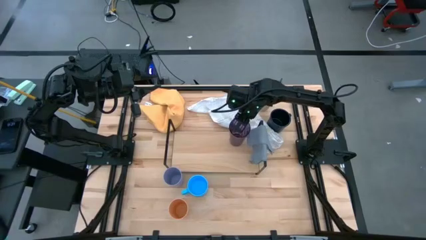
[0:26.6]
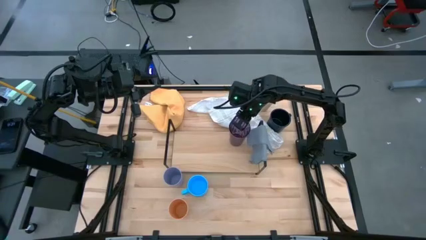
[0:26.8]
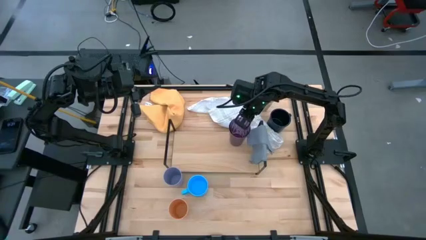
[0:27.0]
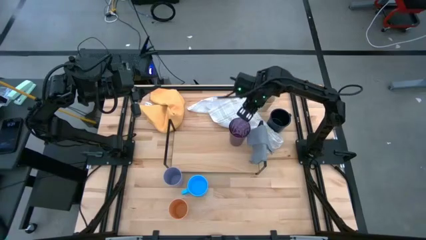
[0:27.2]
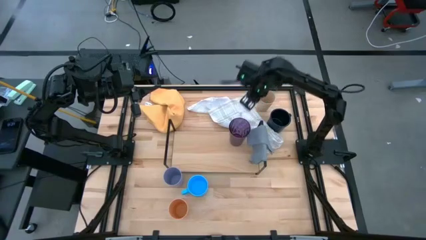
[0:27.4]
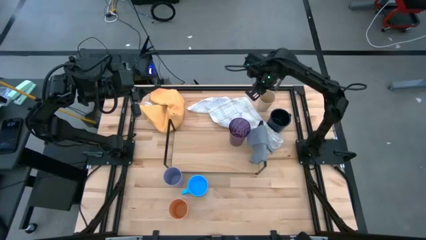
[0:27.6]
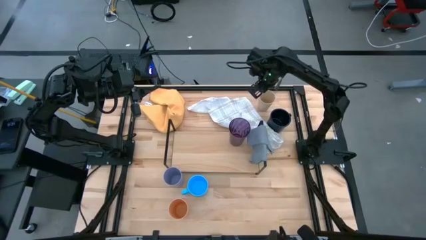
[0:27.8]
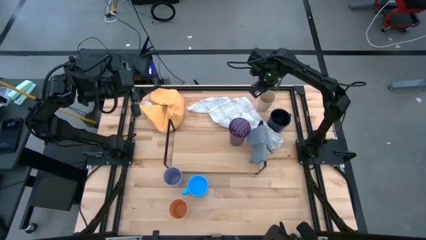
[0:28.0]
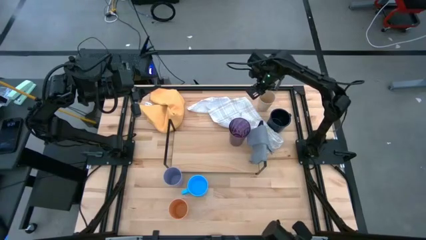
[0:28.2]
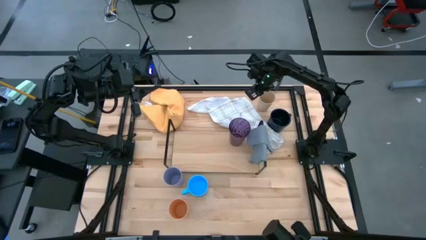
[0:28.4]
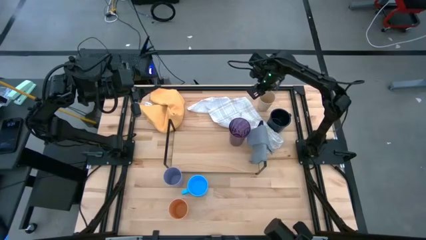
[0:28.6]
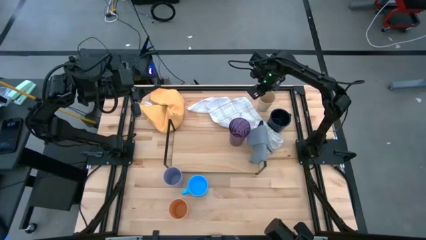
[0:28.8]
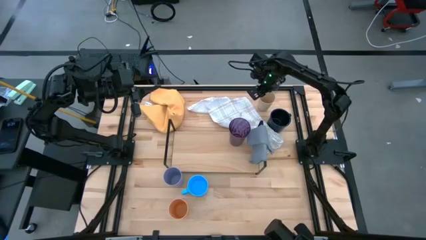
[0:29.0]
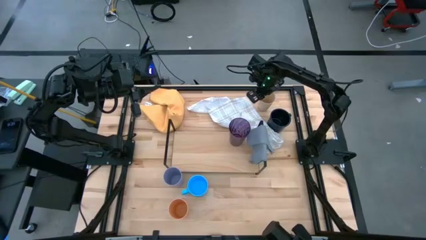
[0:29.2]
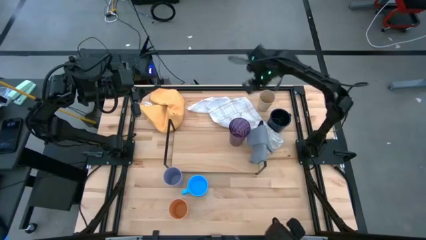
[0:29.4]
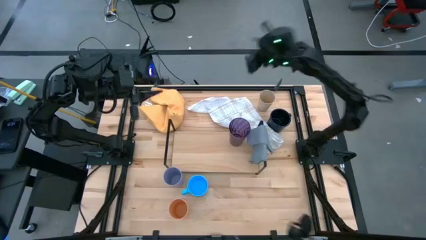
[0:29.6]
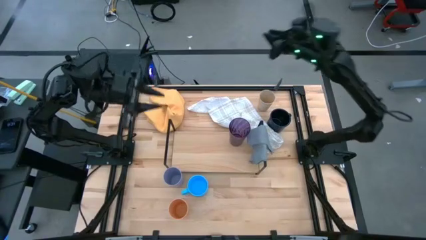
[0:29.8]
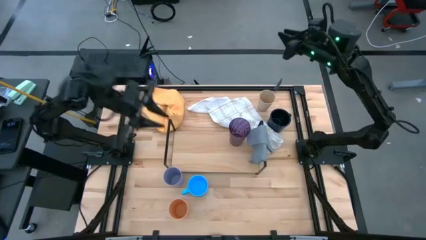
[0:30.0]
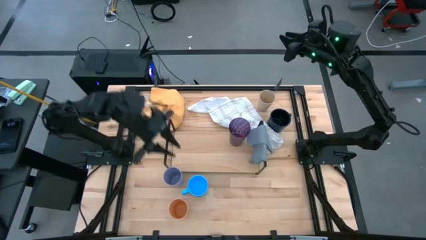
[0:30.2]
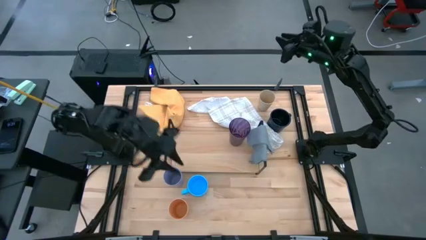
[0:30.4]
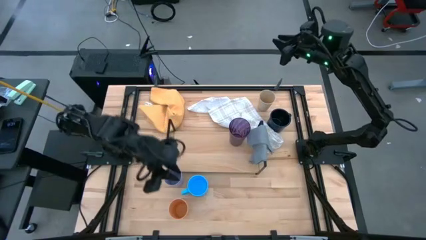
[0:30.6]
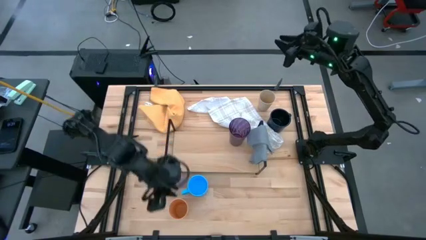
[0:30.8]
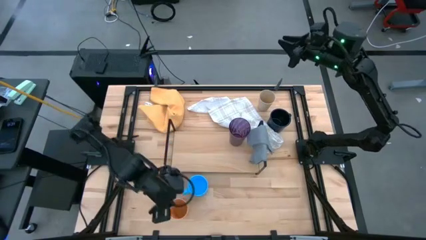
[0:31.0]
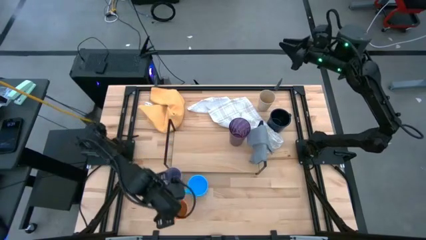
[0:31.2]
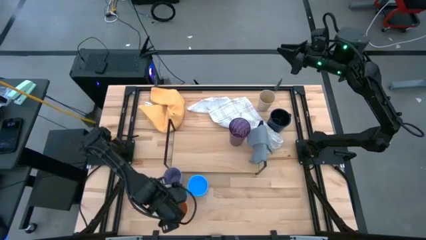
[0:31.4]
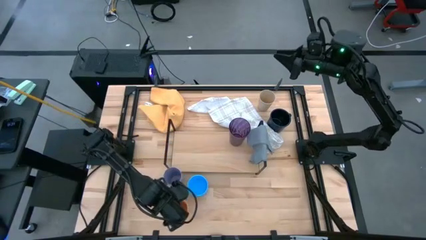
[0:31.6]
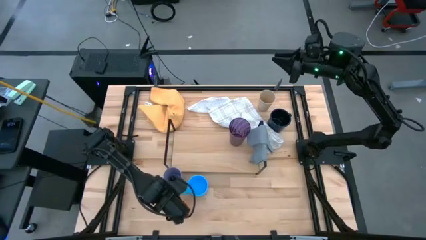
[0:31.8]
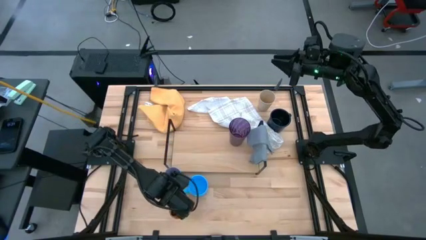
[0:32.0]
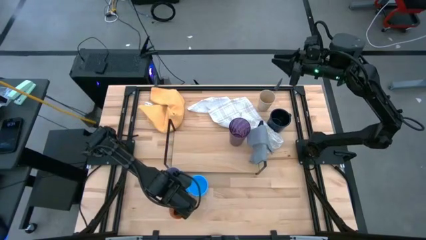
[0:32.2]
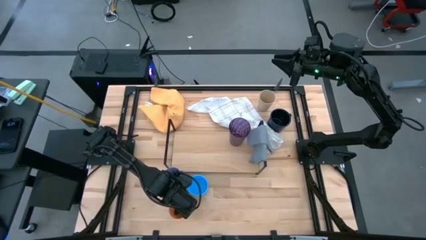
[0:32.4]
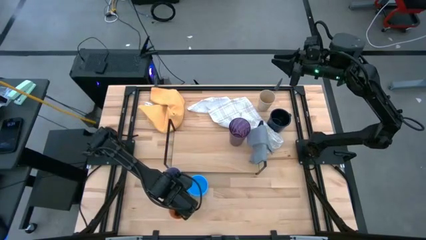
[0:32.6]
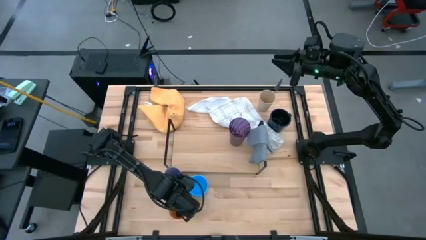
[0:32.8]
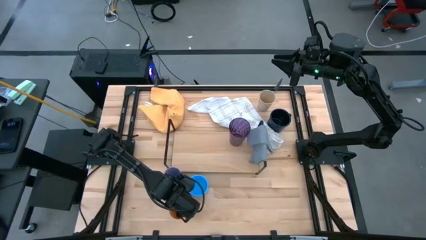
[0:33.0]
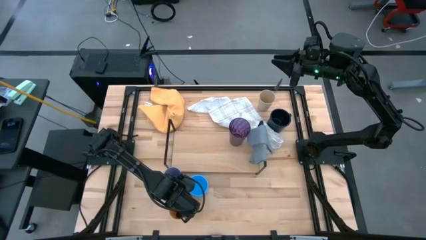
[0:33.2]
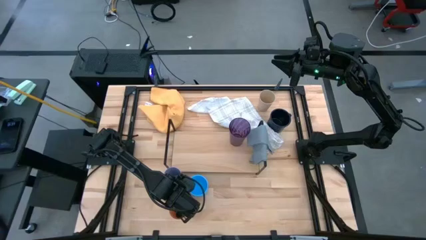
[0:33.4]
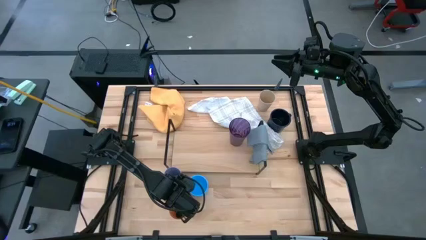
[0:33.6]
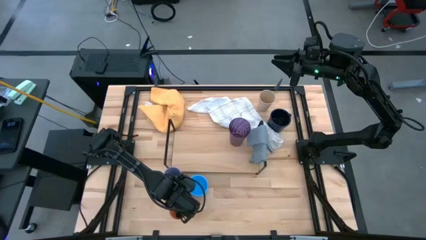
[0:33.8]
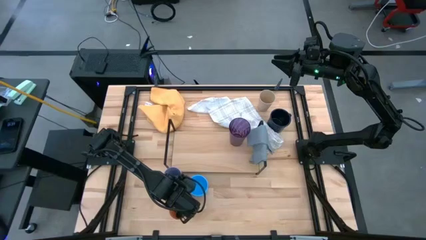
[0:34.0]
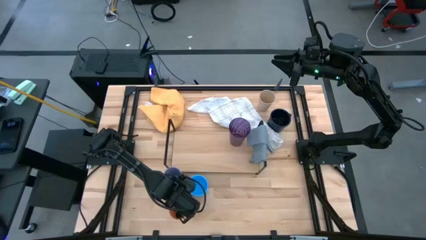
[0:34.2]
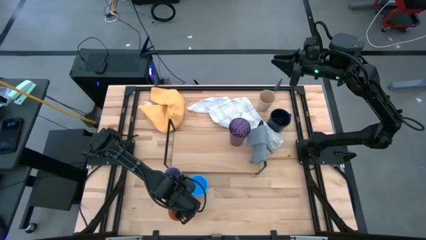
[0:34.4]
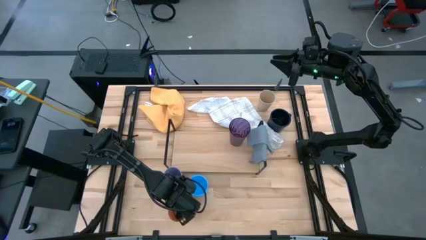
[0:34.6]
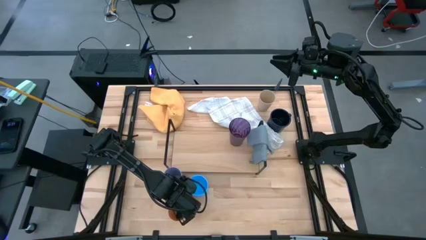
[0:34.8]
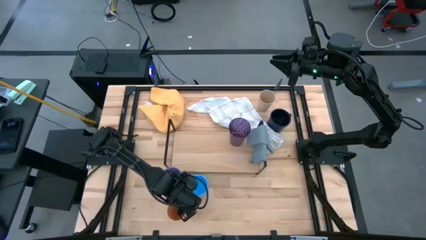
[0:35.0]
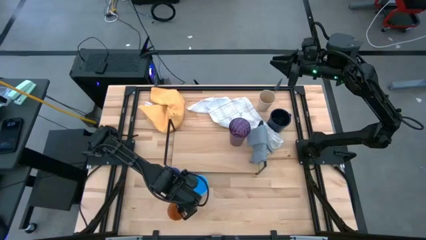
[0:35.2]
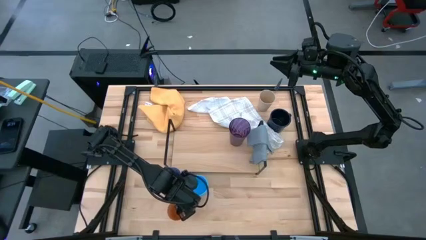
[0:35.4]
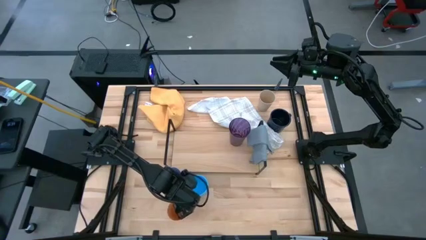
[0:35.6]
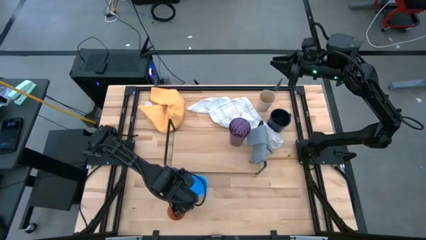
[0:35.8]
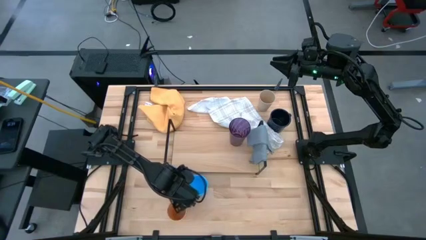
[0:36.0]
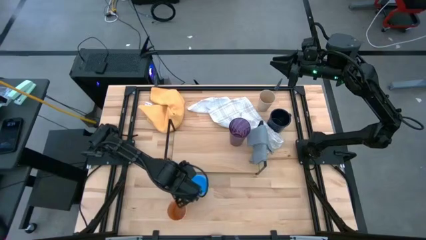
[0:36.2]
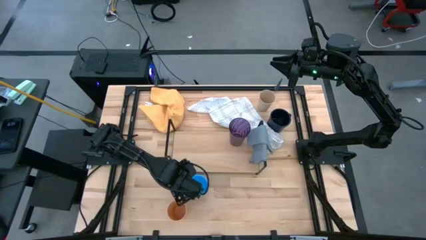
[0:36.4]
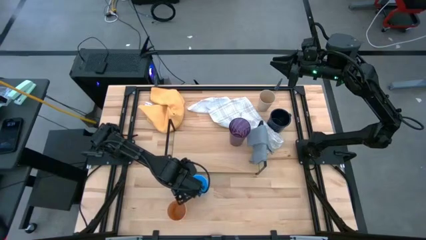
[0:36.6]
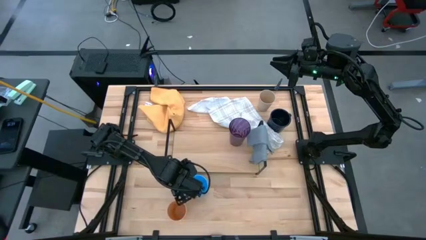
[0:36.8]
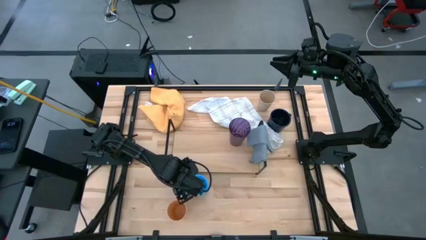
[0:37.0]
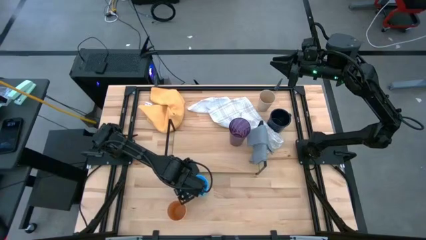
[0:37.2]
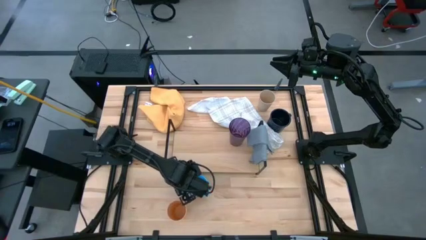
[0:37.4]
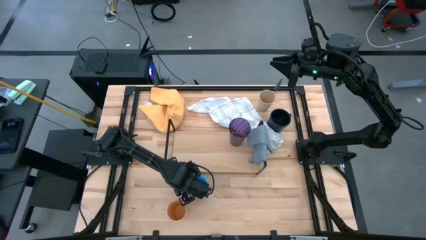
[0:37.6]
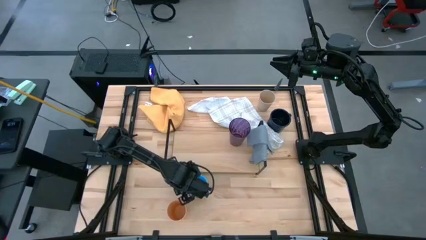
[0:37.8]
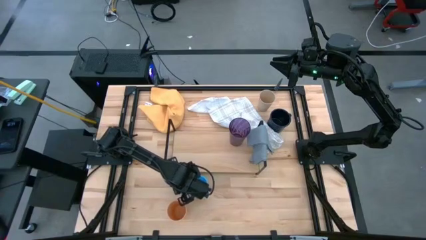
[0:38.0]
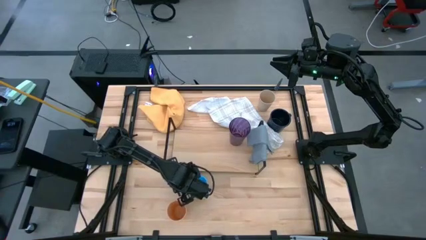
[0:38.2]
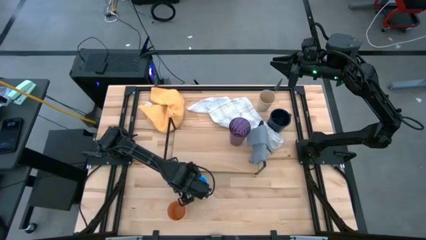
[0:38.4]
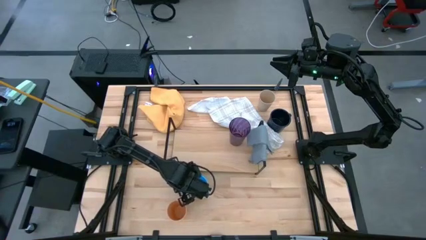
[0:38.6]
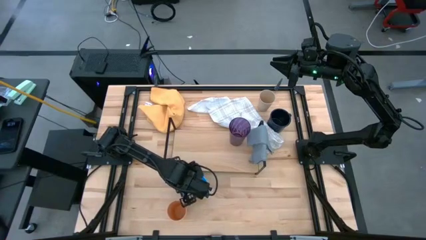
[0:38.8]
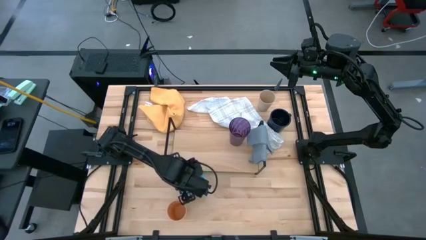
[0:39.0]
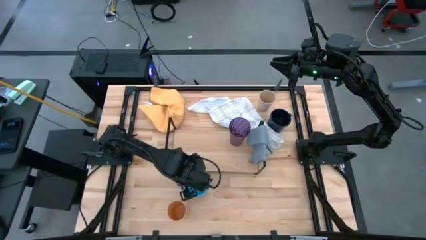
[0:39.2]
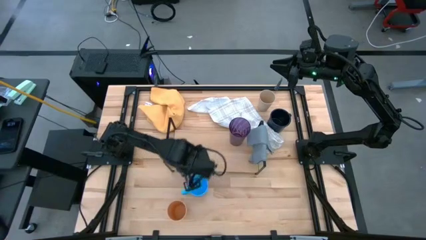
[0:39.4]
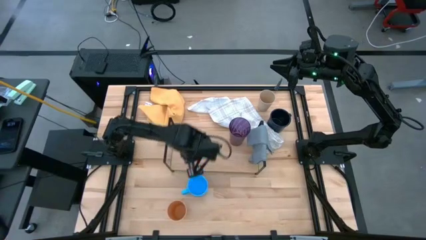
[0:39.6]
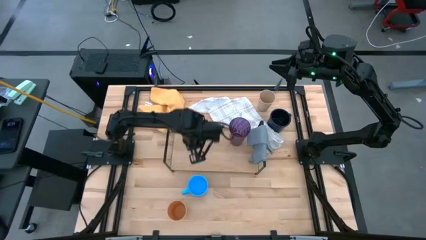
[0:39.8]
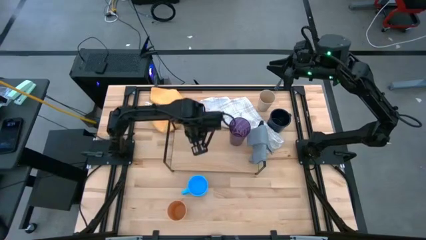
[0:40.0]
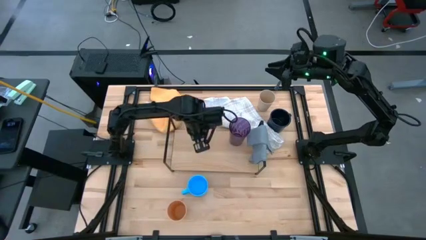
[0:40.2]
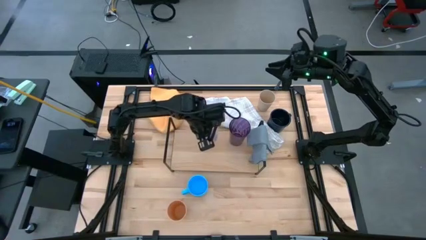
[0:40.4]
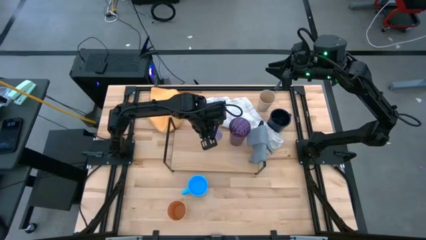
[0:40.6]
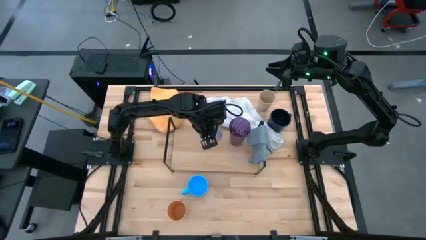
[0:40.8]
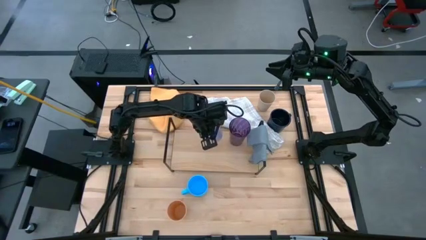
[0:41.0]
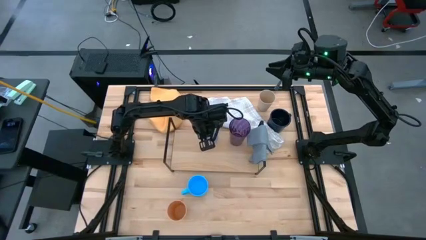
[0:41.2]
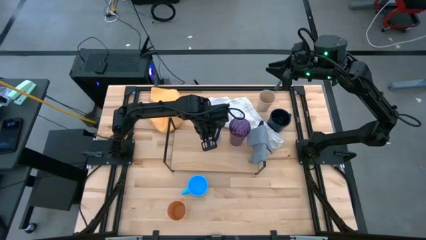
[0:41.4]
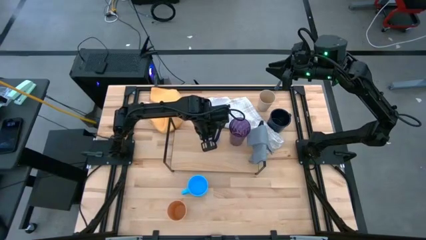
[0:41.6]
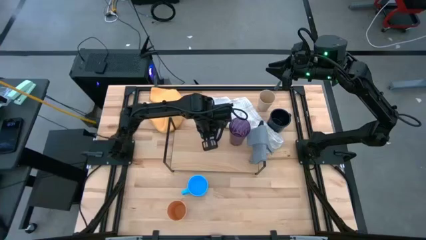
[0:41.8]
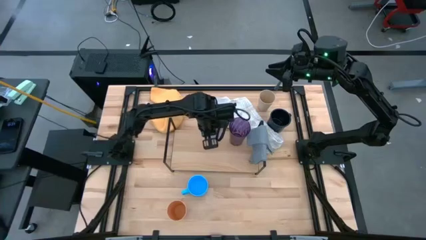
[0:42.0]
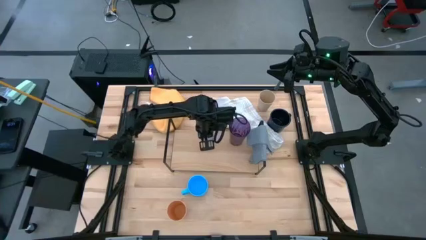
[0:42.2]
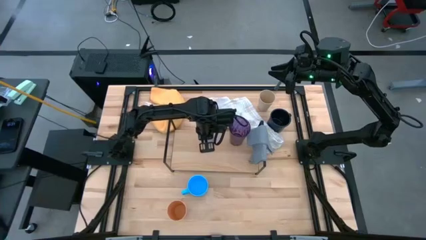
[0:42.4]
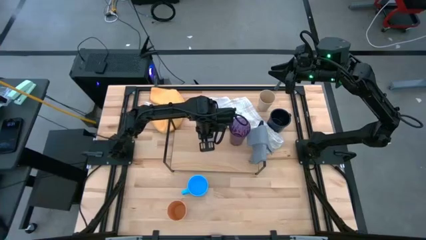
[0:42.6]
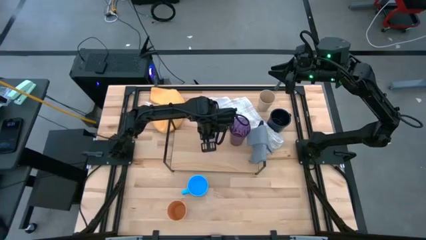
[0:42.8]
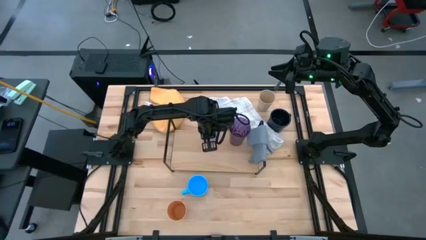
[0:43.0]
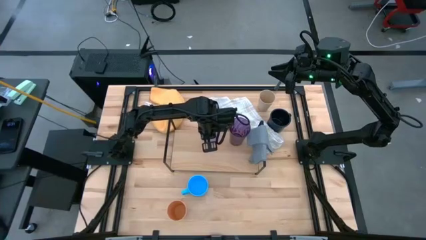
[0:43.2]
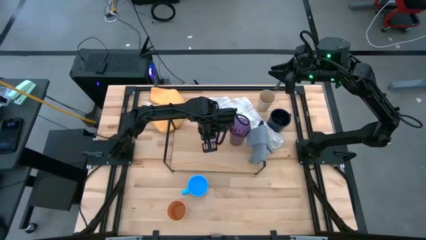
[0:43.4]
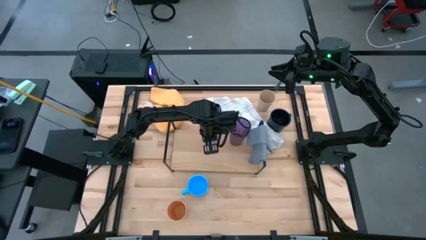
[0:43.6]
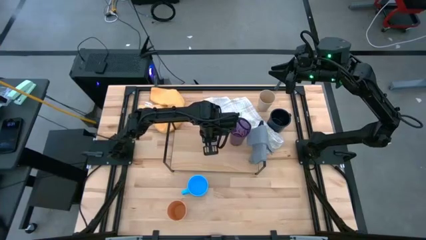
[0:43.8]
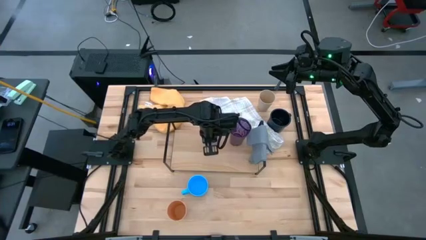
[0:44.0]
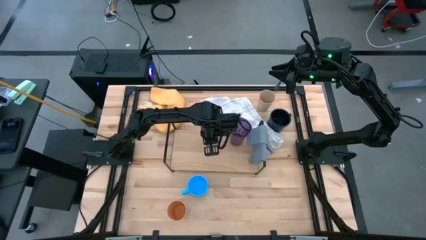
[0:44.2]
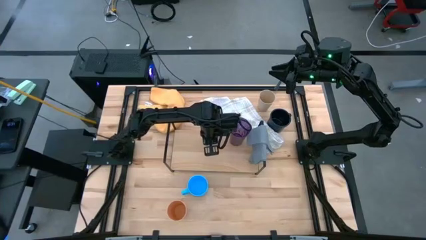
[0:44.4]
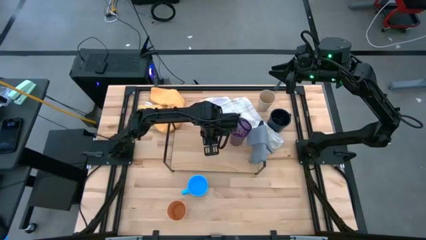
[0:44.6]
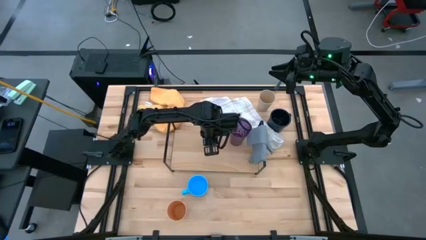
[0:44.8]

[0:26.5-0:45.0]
Task: Stack small to large cups/mugs on shelf
Put the blue cup on the shelf
